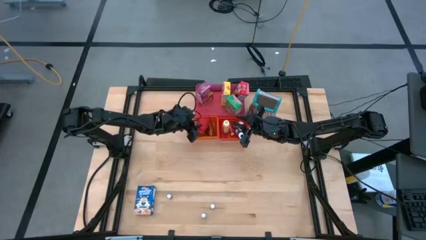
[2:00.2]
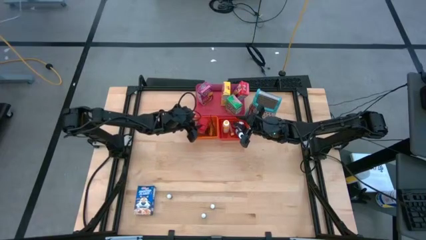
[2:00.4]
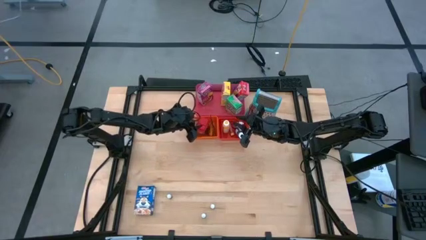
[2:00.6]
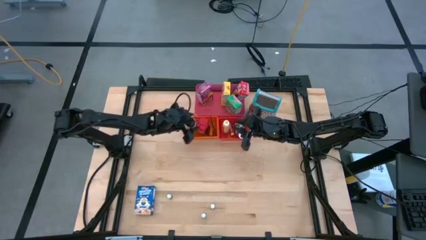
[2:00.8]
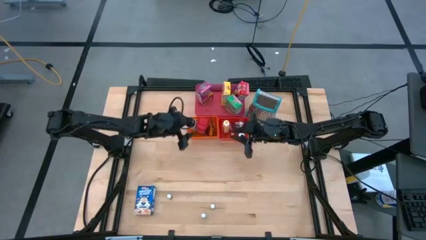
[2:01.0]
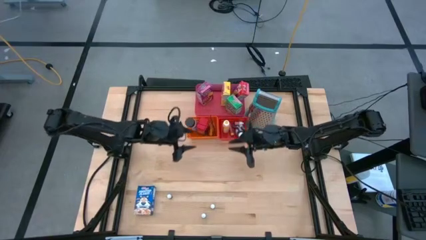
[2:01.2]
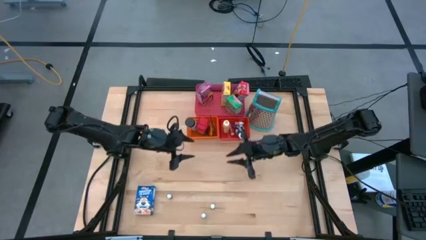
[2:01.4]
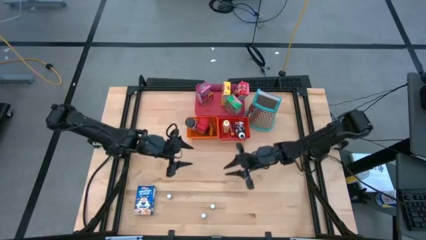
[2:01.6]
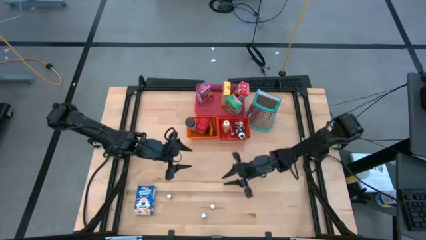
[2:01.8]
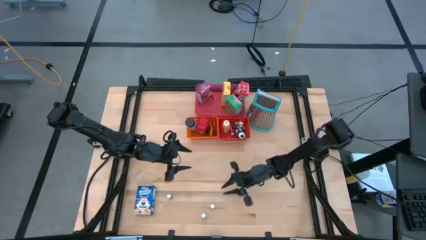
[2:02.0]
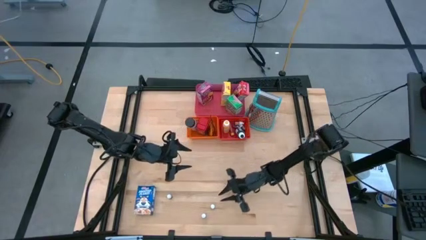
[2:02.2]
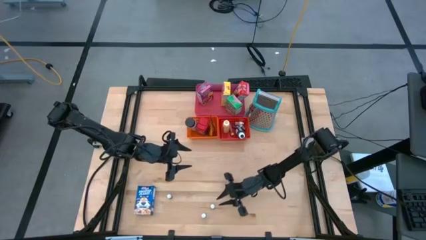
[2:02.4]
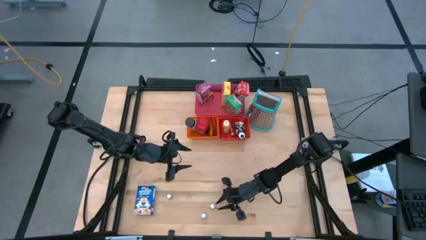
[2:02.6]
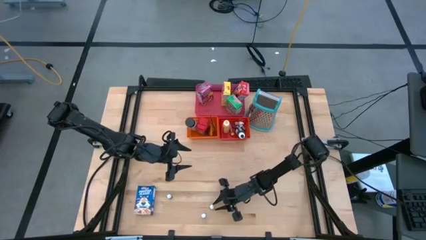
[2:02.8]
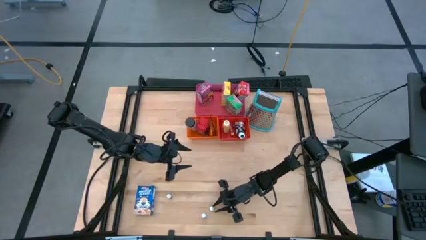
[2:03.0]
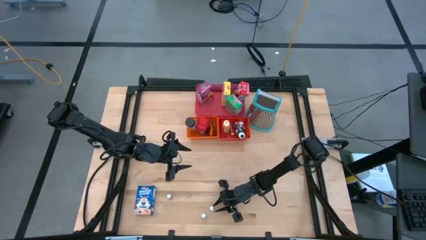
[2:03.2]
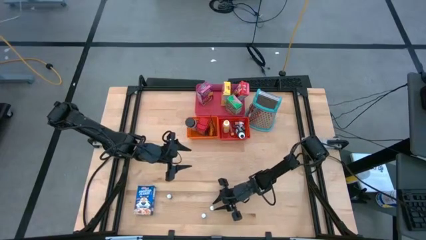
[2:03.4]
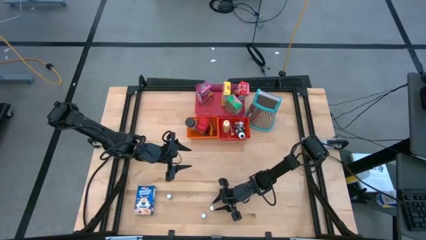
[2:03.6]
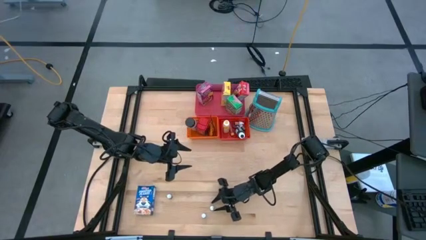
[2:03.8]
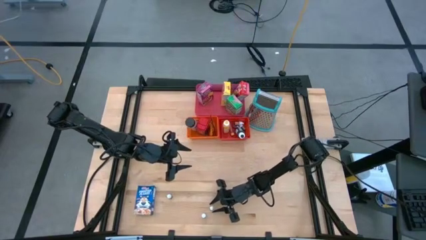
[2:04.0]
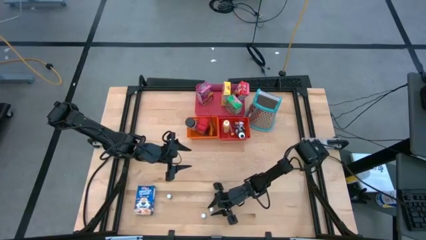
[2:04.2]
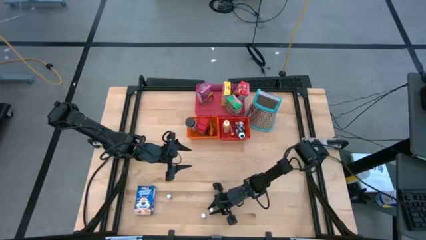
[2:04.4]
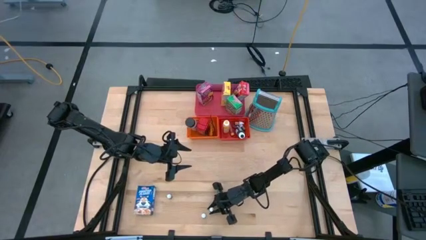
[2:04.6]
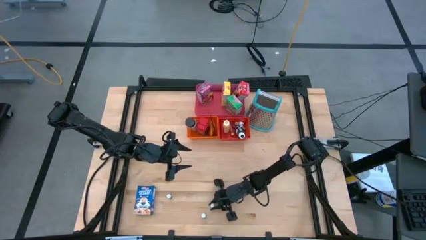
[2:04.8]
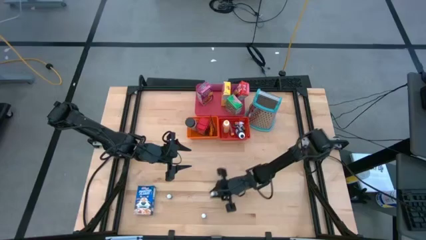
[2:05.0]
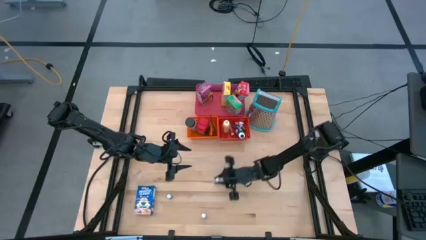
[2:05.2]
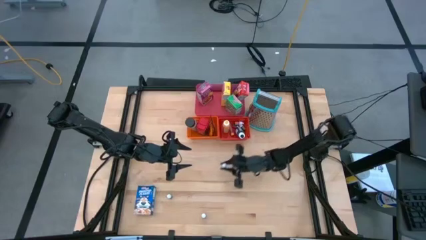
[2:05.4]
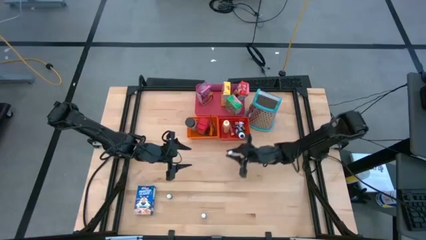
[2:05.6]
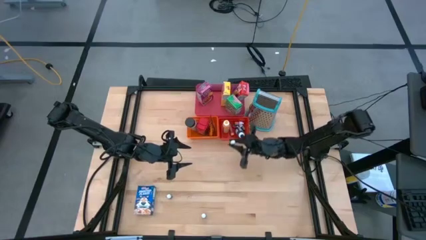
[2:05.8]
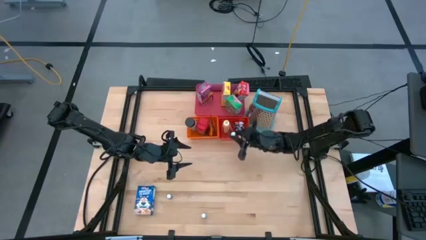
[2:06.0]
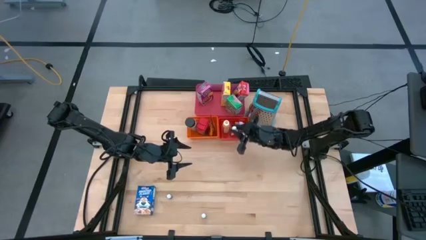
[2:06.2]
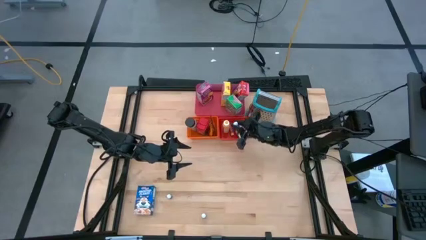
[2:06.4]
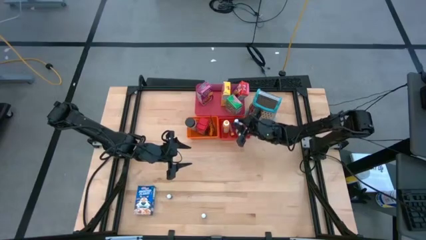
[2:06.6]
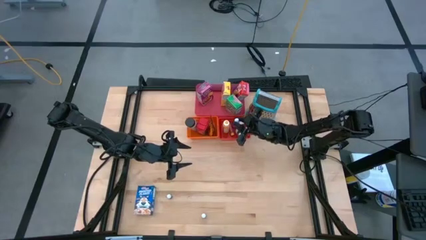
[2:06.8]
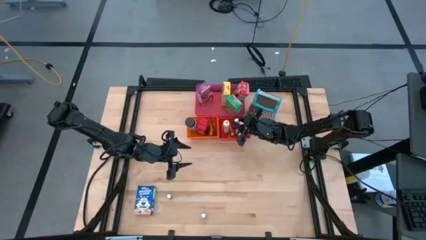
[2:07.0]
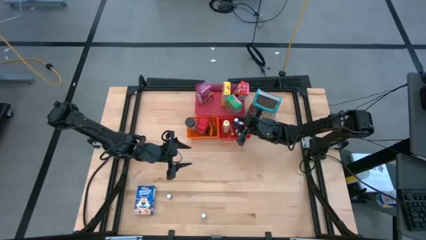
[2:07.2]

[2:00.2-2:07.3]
Task: Pick & Place Kitchen Items
Put the brown food coloring bottle into the red bin

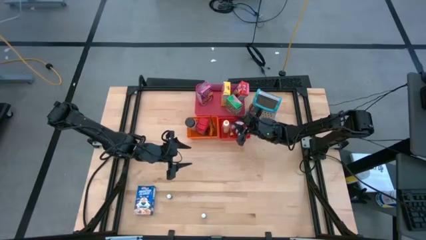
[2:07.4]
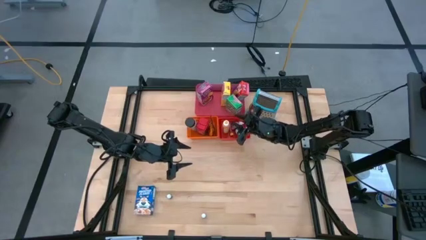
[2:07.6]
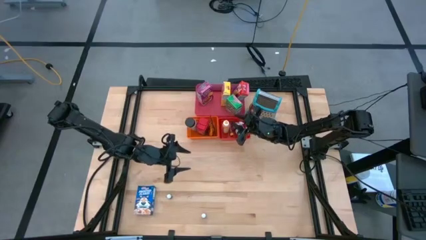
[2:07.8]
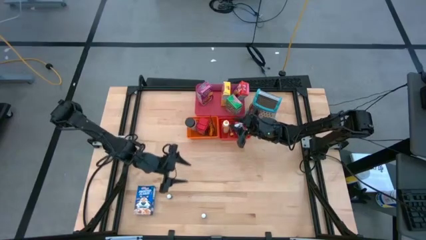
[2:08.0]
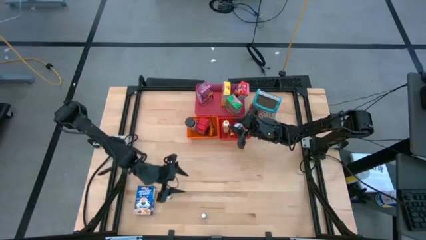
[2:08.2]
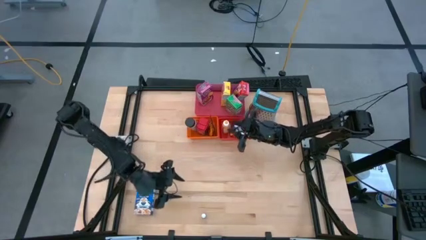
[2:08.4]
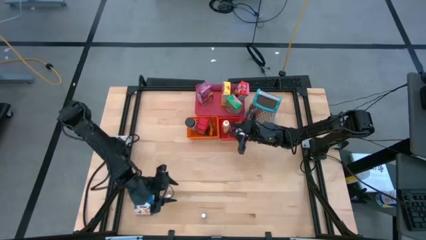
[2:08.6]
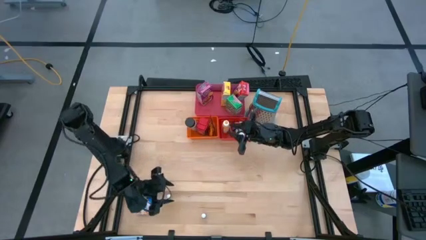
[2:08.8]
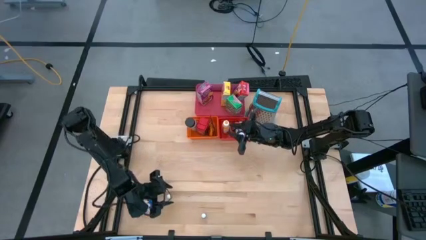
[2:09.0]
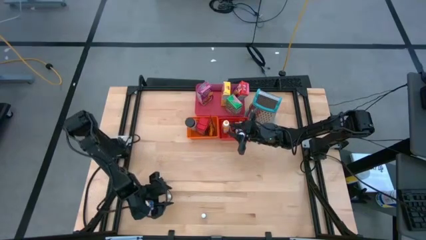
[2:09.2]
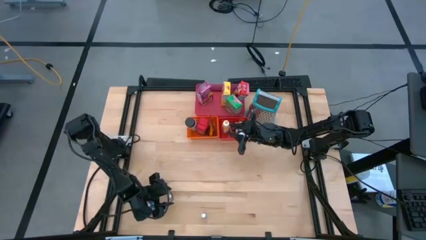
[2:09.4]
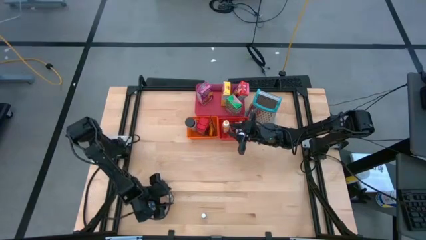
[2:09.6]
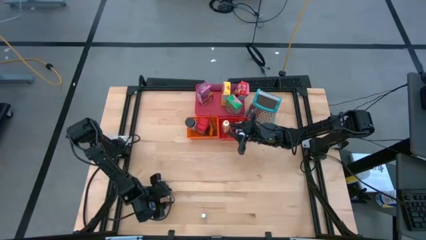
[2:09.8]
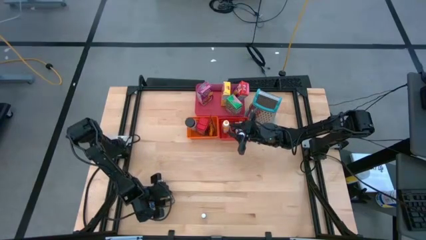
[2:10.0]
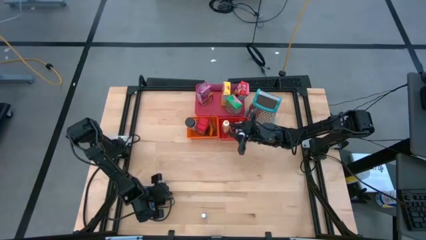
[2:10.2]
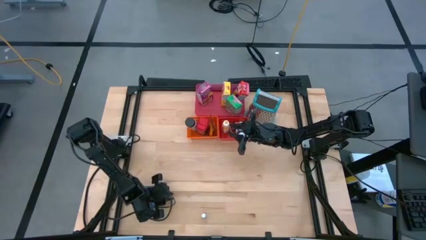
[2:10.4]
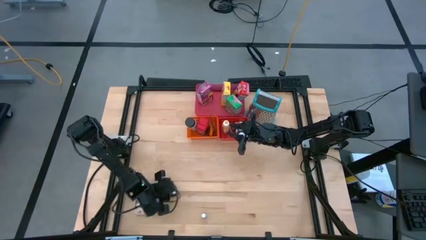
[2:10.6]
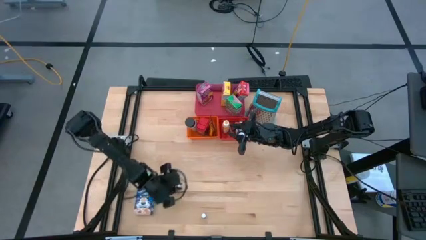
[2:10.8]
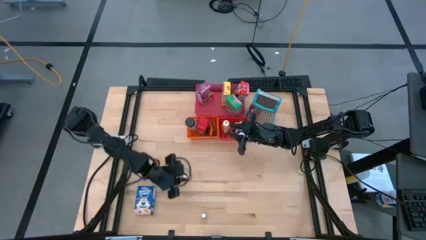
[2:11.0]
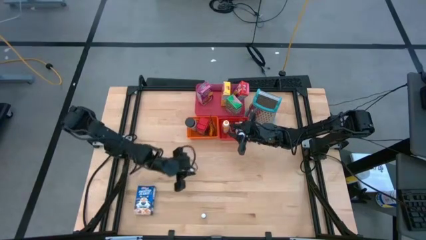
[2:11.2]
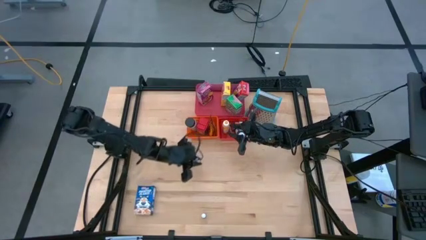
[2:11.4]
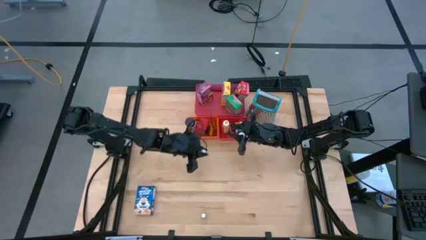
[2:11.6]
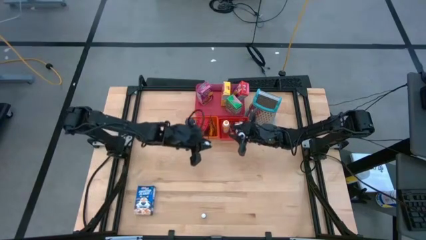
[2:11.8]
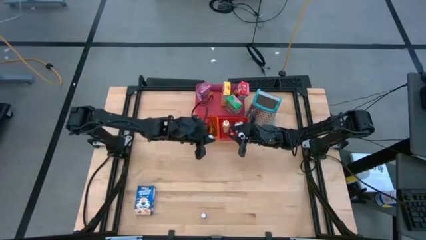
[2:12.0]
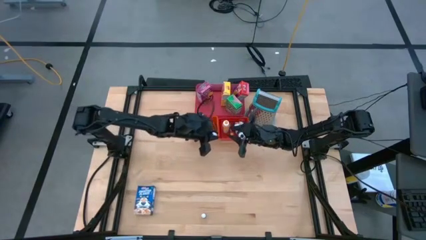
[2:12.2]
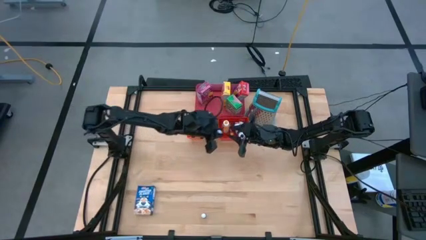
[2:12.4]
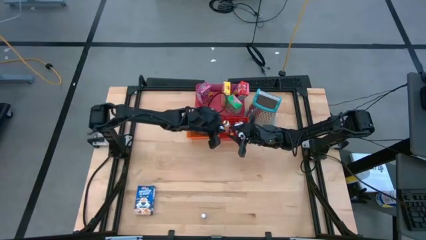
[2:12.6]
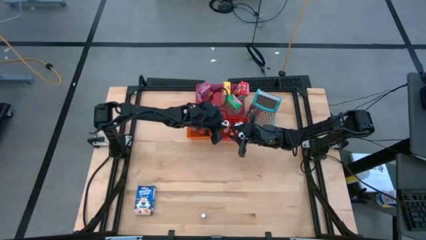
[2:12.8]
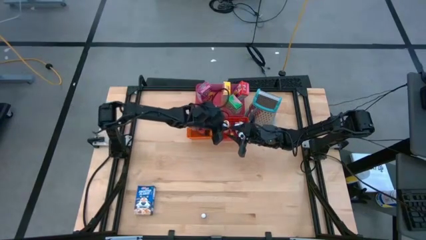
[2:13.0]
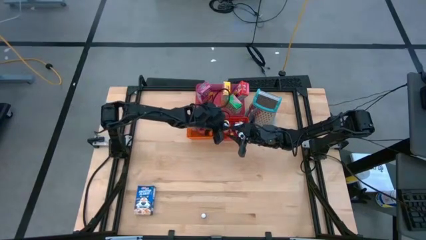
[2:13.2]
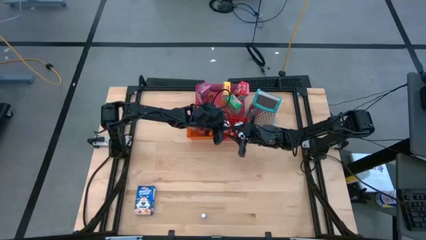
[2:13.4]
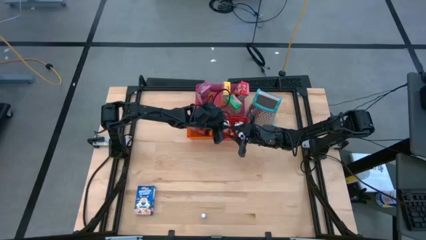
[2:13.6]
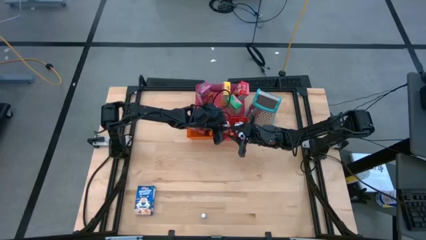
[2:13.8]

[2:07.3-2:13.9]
Put the green food coloring bottle into the red bin

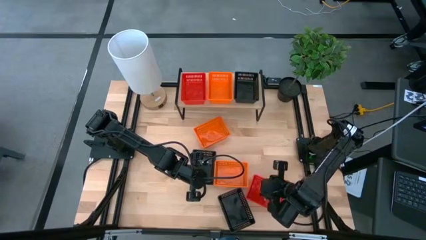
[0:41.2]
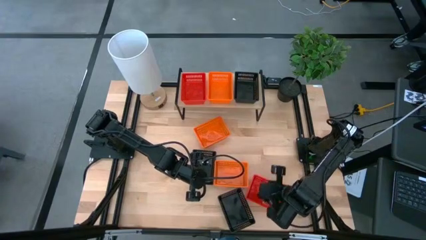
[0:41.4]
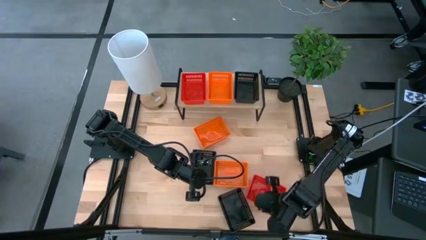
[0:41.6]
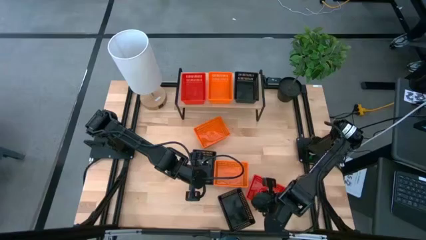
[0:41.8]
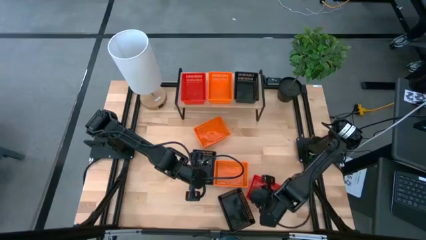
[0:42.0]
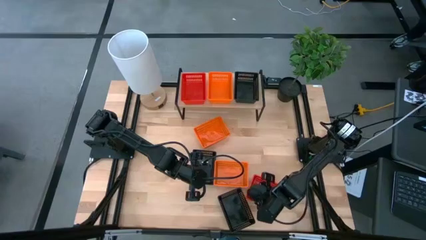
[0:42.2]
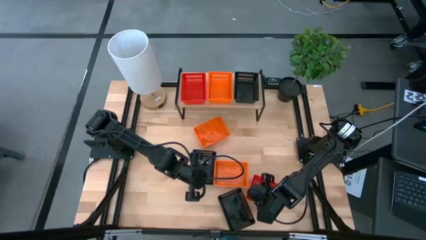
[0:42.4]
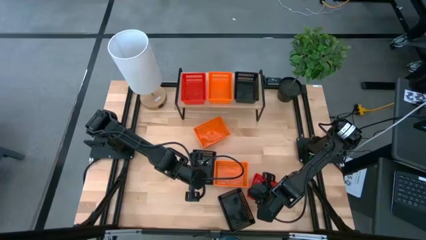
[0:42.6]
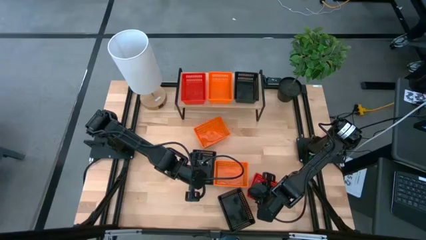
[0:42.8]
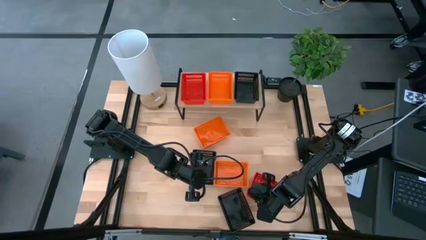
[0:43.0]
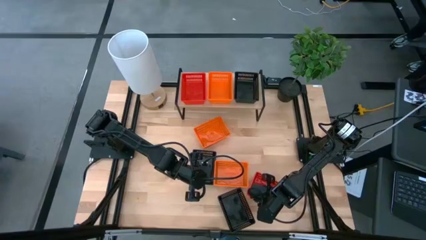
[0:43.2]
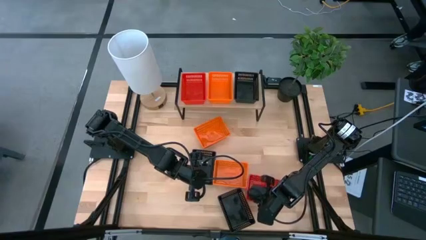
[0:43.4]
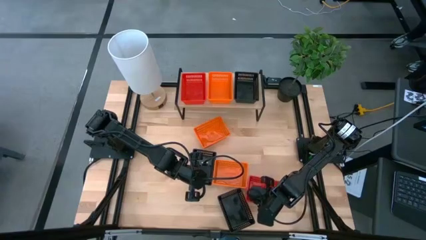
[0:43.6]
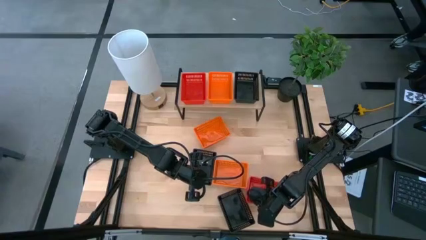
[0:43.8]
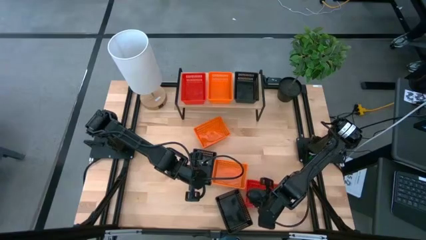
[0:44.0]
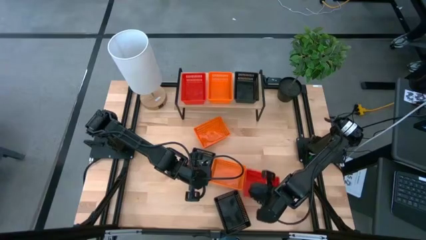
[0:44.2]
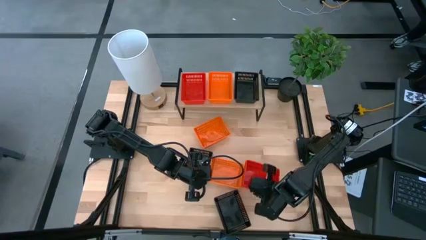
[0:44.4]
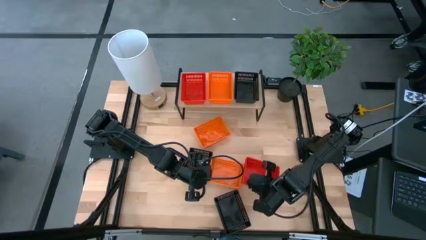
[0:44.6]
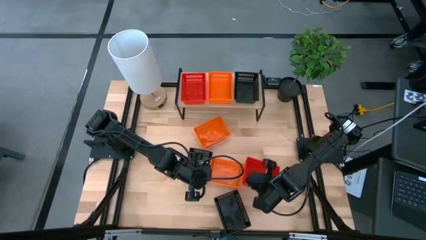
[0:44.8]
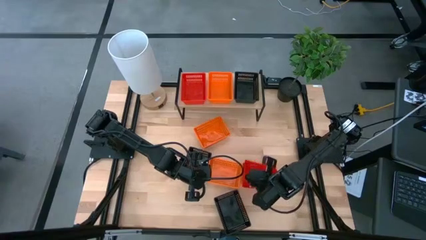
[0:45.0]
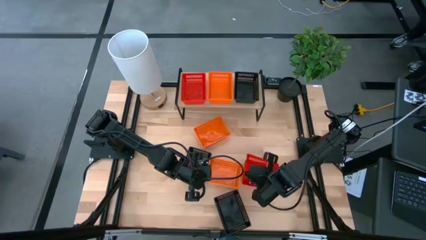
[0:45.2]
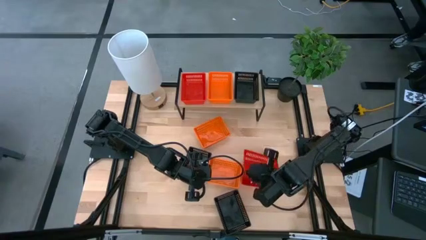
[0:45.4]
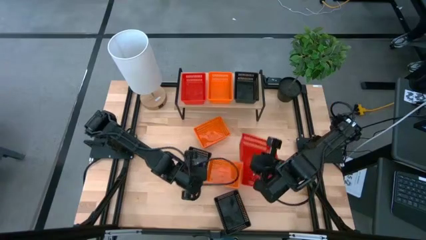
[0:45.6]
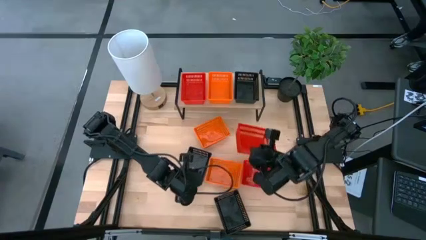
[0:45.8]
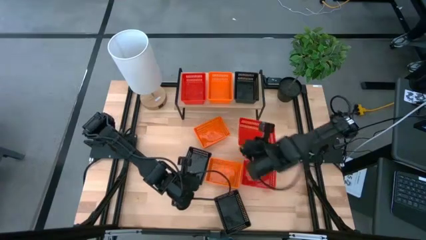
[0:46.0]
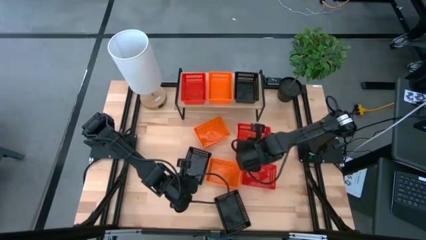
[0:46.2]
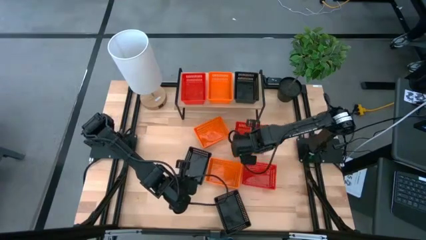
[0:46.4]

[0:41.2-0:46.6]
Task: Stack baskets on shelf by color
Remove the top red basket from the red basket
